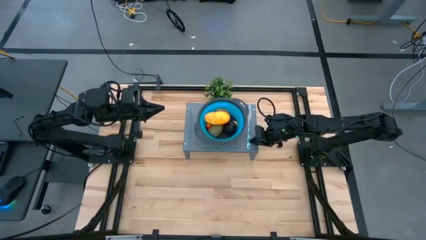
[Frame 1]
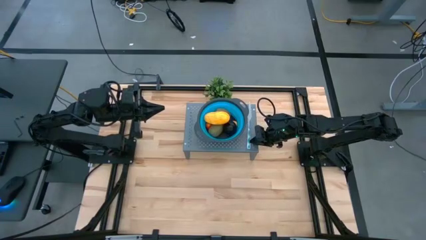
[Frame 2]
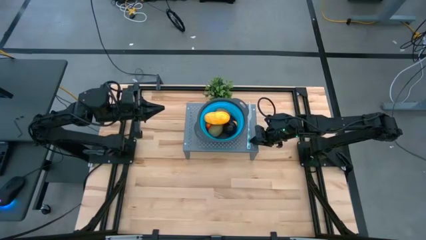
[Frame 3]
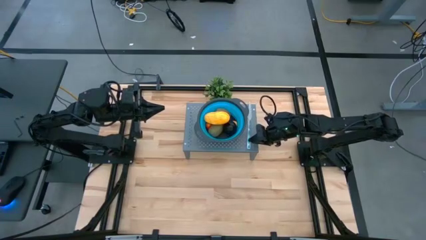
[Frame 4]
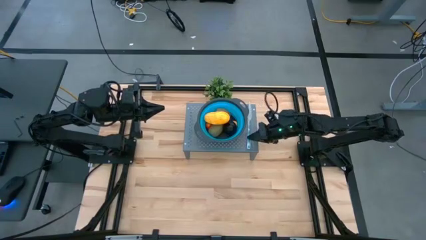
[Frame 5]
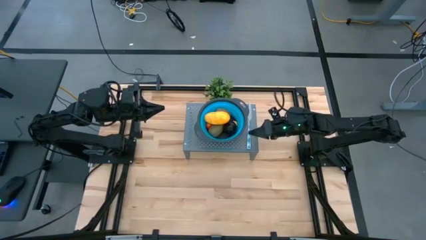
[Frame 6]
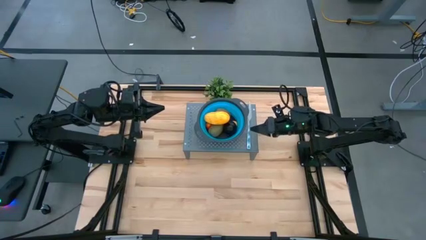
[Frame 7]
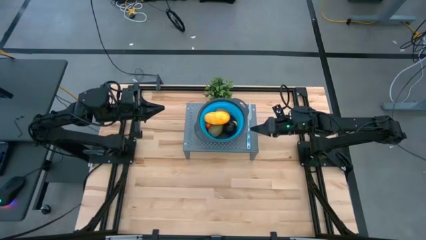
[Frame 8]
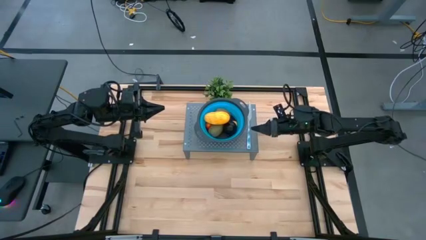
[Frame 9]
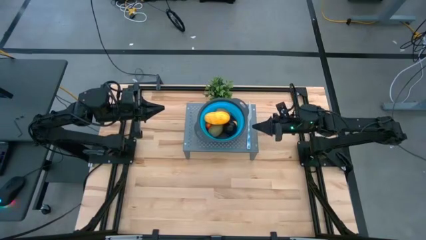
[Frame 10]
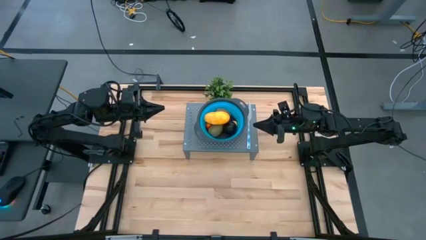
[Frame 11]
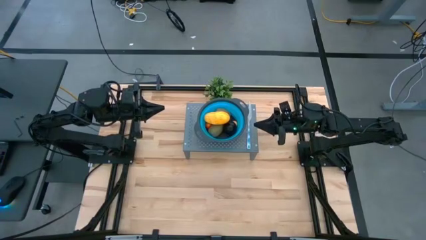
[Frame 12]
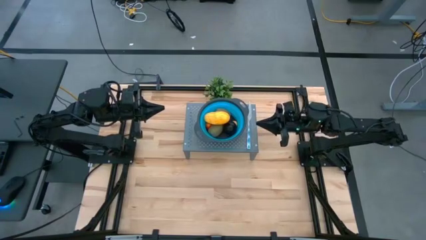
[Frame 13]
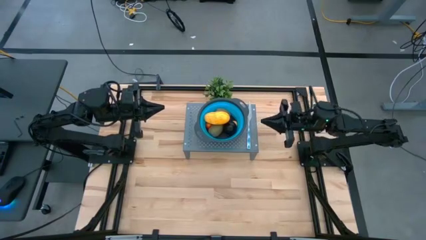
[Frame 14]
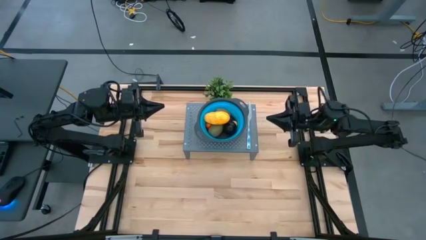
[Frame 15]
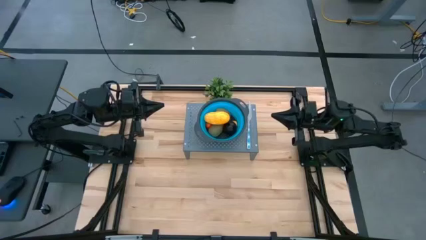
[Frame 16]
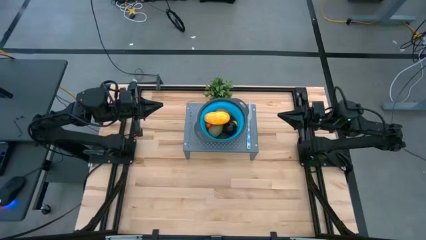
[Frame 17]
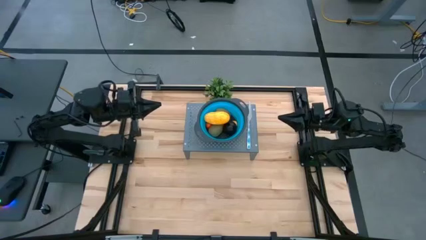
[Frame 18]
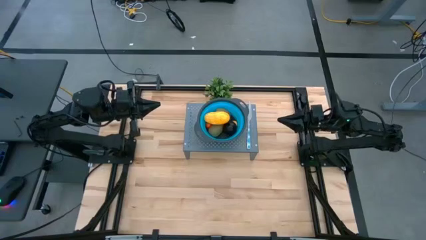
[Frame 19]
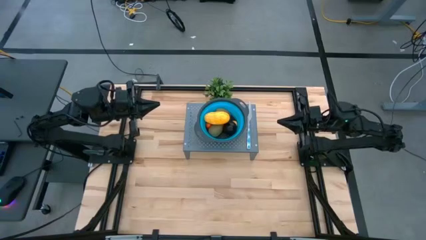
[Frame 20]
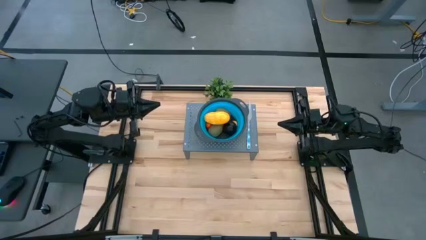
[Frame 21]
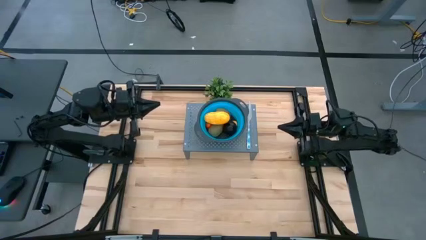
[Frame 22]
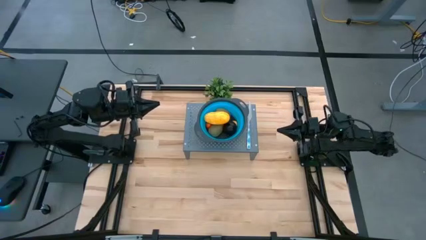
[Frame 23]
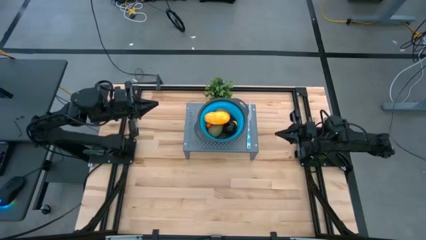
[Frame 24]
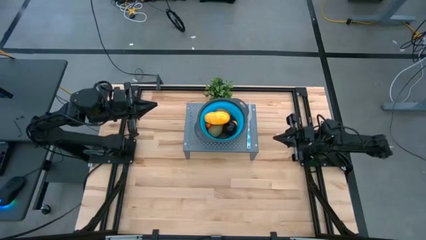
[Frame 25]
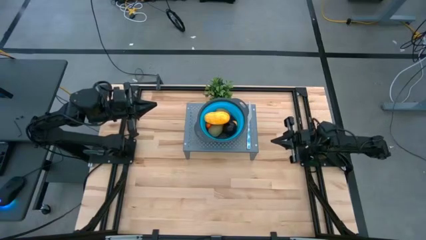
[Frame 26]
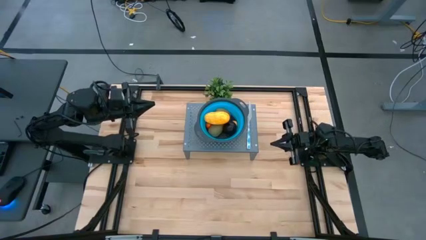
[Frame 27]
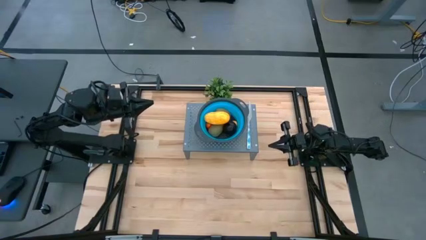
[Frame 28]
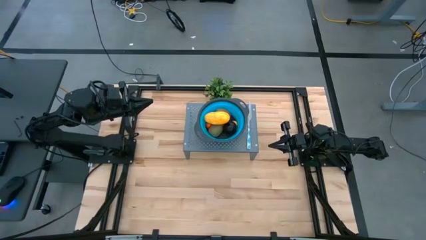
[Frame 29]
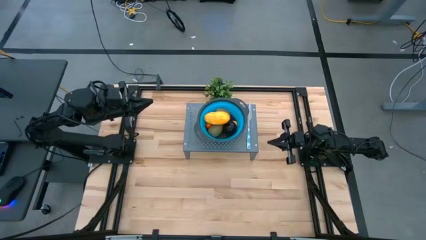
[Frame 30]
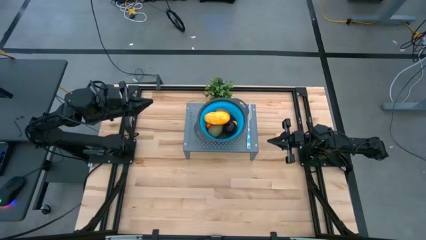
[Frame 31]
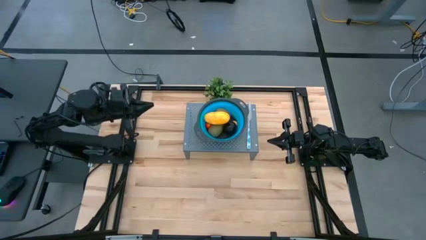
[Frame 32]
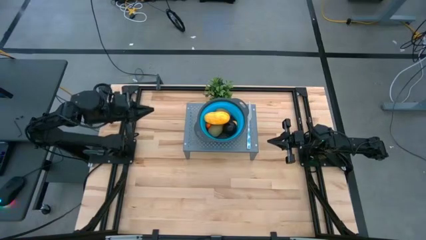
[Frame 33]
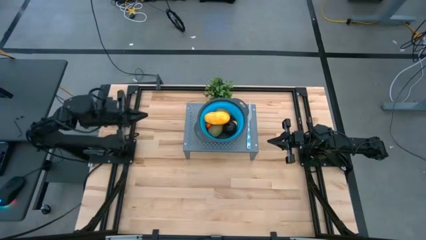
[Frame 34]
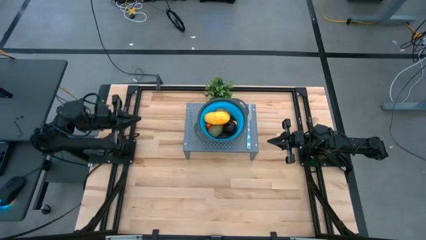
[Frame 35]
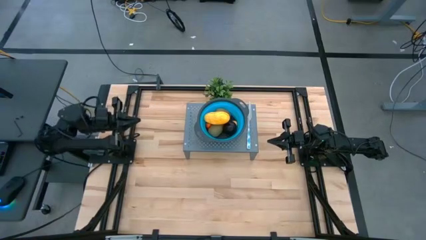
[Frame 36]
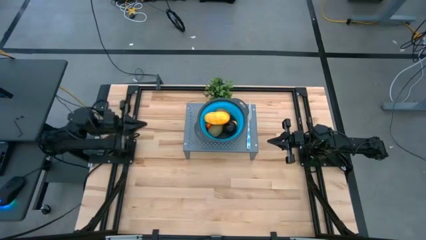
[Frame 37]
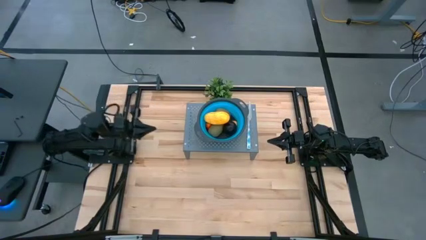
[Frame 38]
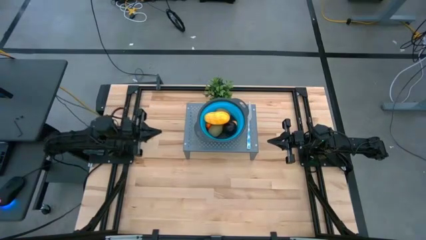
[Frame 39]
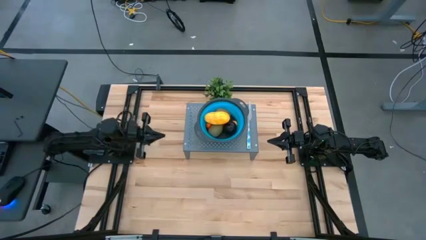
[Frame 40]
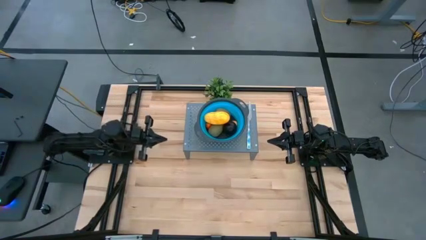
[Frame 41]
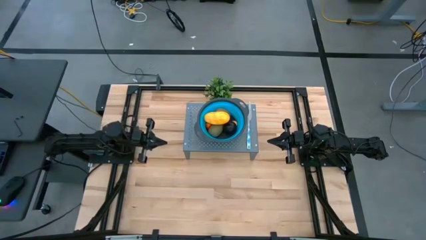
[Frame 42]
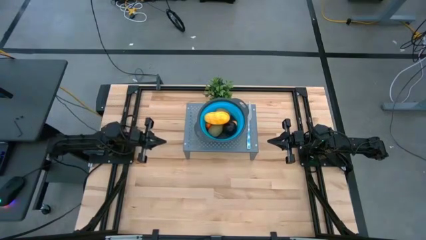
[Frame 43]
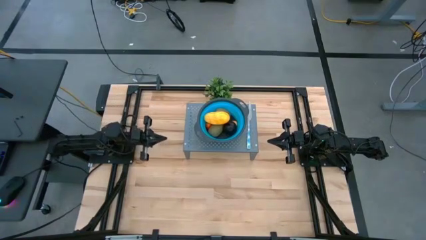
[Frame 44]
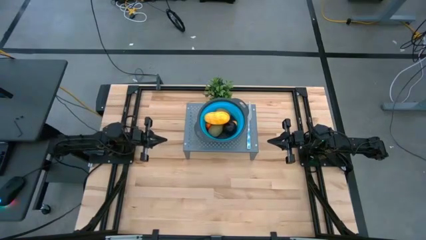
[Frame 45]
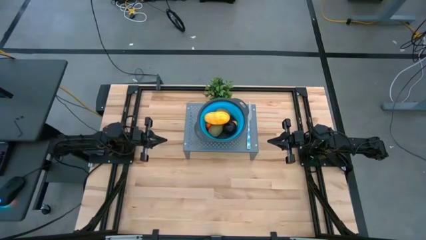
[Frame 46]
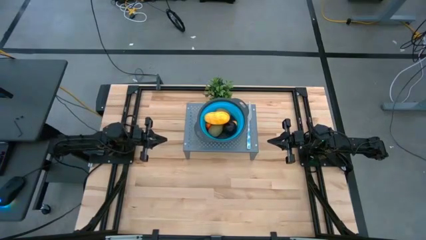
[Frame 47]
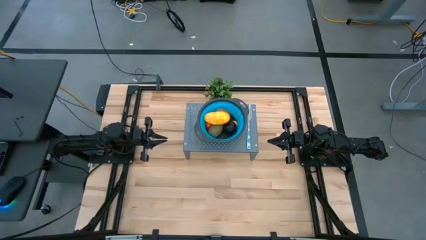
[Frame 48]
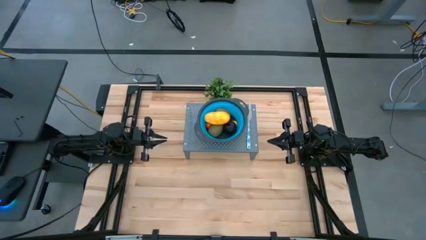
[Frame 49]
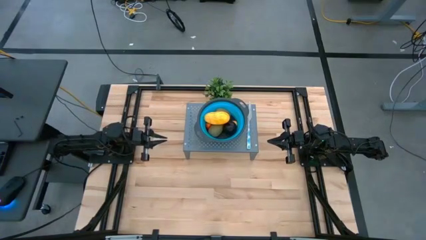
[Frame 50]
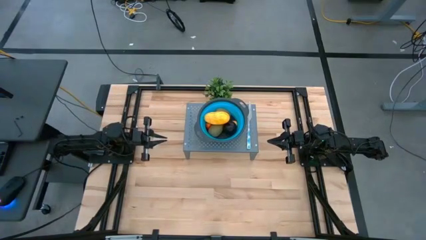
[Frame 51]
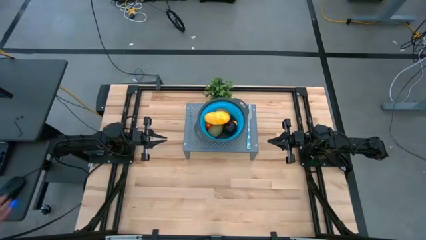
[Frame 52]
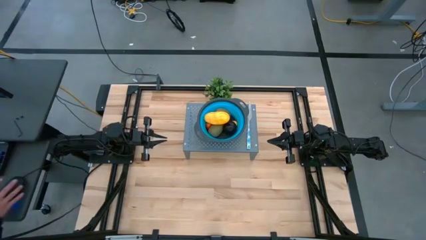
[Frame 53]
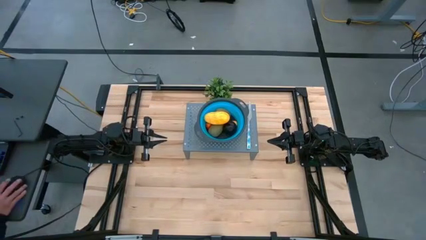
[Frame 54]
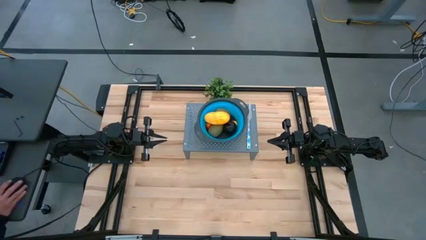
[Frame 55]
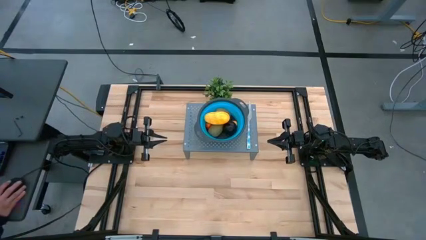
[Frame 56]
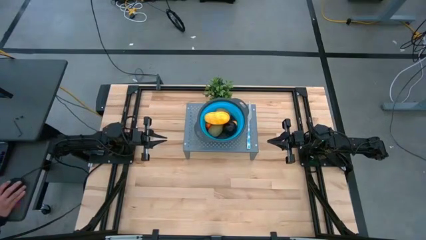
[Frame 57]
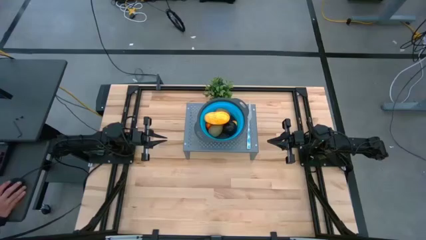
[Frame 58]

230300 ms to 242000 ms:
Task: Pick & Place Fruit
Return to Home Position

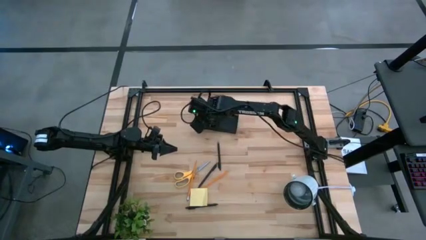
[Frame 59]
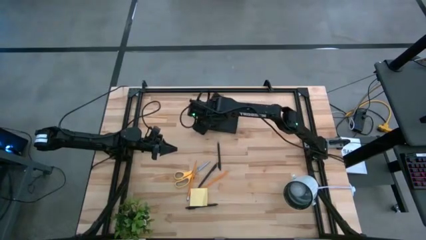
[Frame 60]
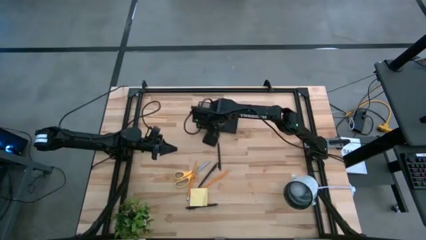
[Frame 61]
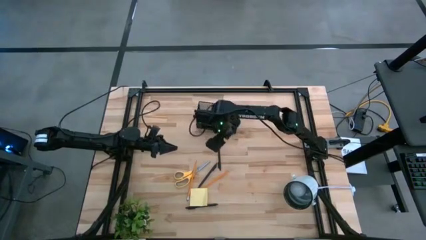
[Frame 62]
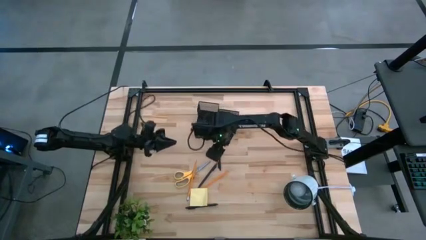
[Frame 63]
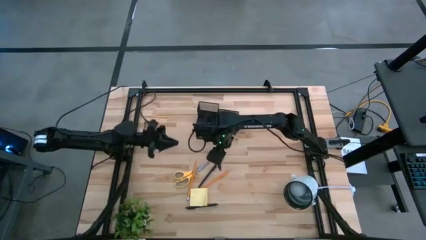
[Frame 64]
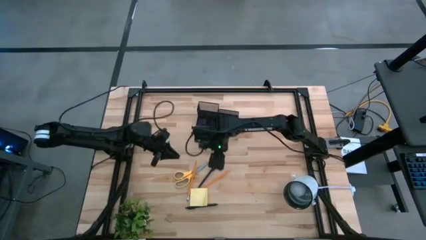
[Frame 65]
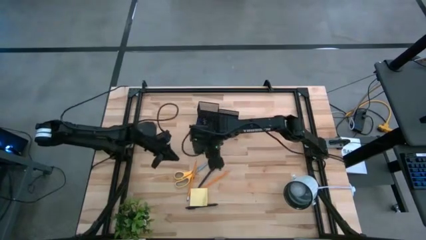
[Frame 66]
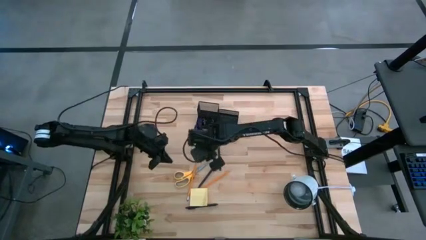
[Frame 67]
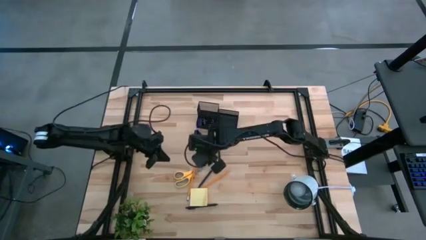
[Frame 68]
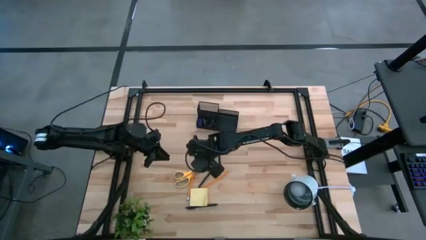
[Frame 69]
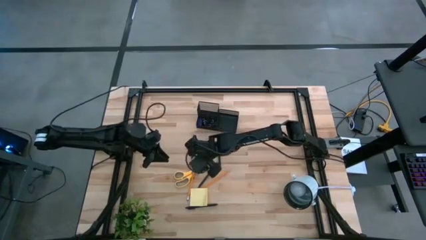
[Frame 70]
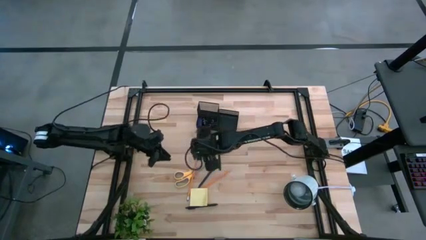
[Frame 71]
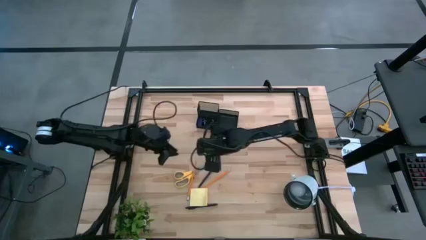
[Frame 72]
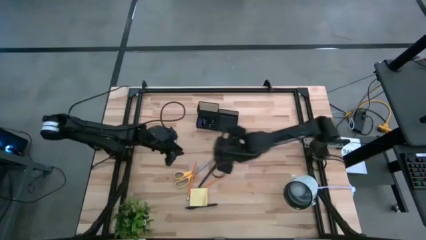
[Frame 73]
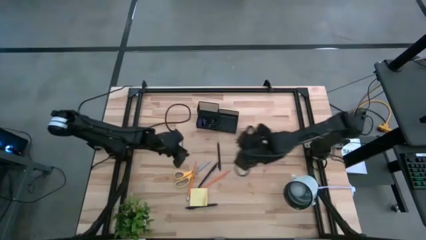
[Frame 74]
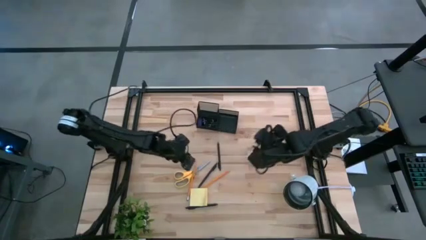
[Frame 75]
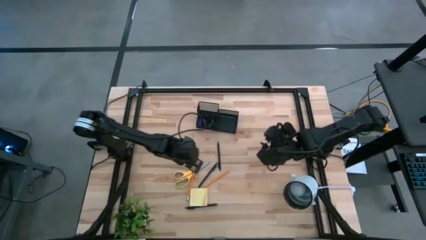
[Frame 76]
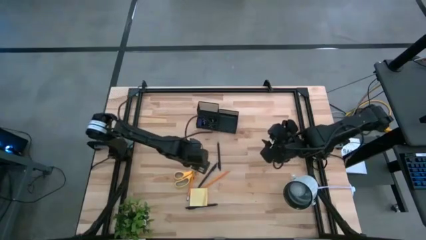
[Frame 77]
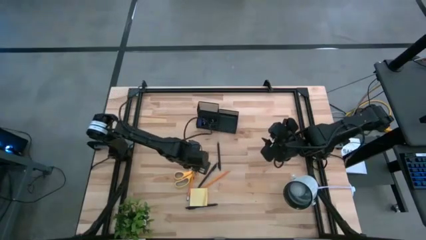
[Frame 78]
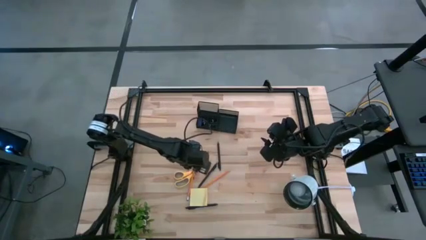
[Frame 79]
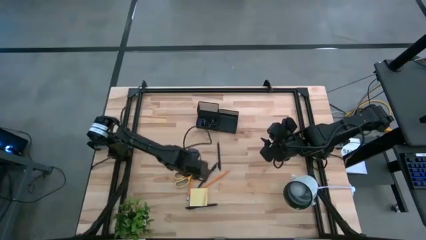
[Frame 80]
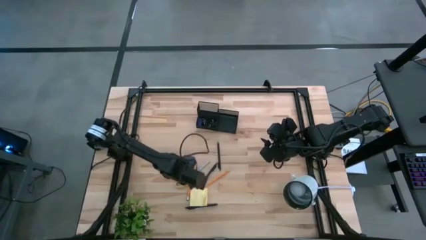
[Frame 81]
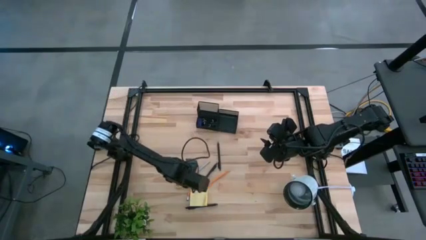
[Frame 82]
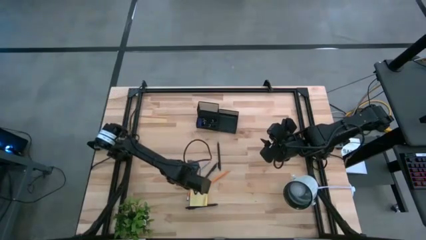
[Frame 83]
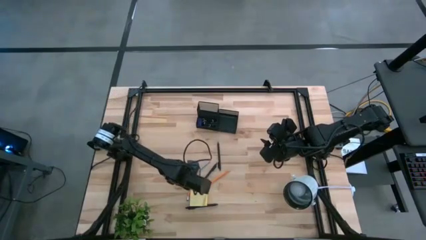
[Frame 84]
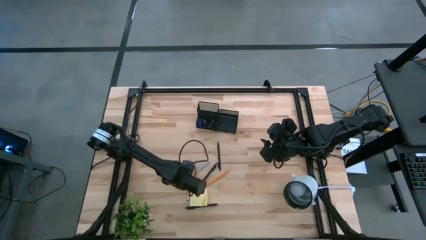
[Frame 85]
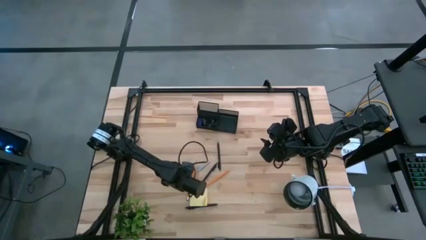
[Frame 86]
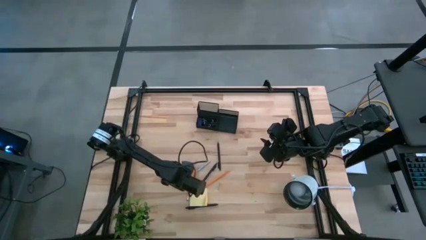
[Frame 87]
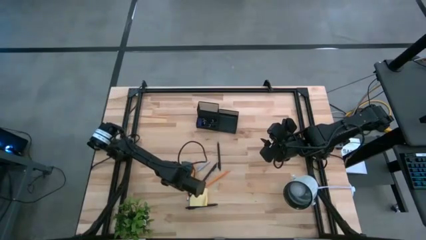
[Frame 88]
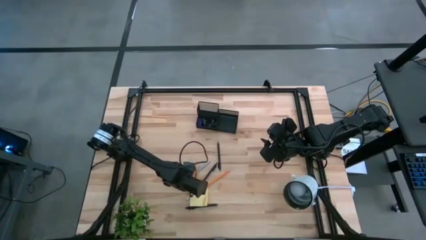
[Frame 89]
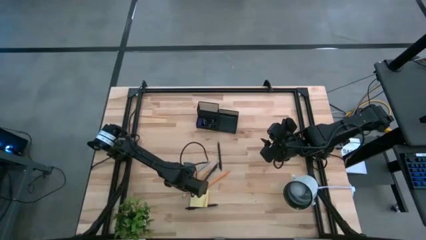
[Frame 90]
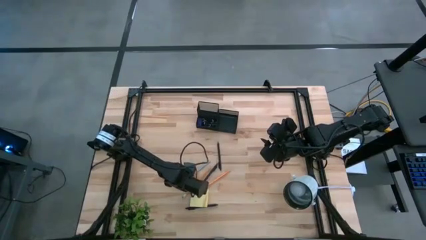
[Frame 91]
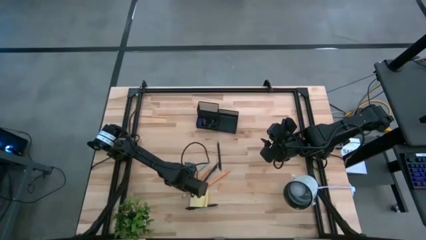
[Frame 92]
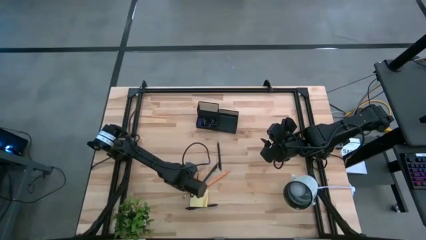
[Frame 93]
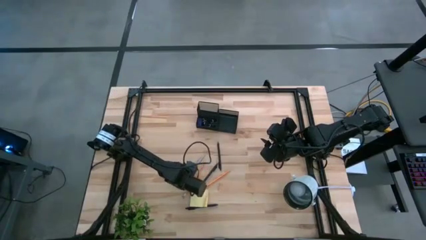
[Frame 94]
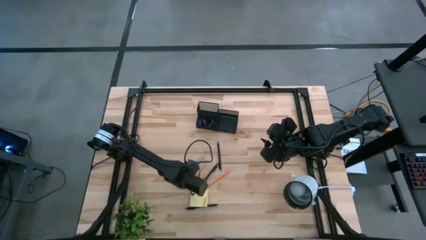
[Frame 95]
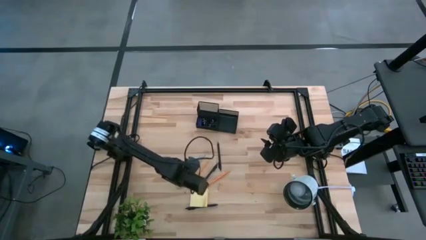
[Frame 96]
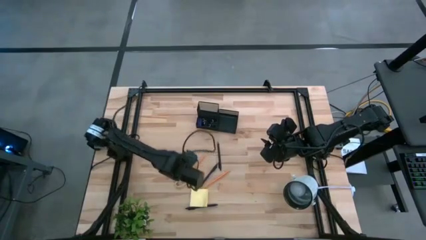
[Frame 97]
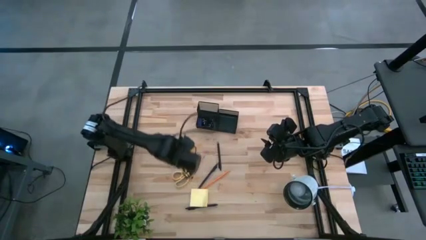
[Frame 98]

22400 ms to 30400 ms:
Task: Pick and place office supplies into organizer
Put the left orange pencil into the desk organizer
